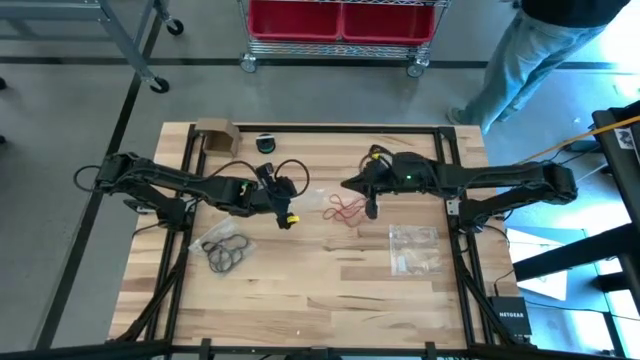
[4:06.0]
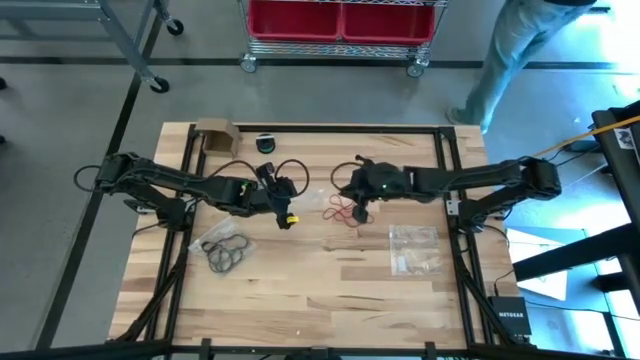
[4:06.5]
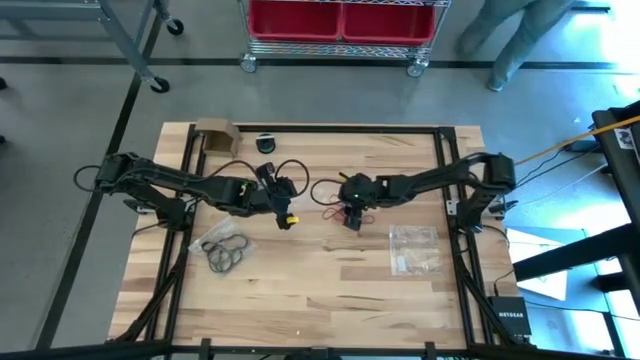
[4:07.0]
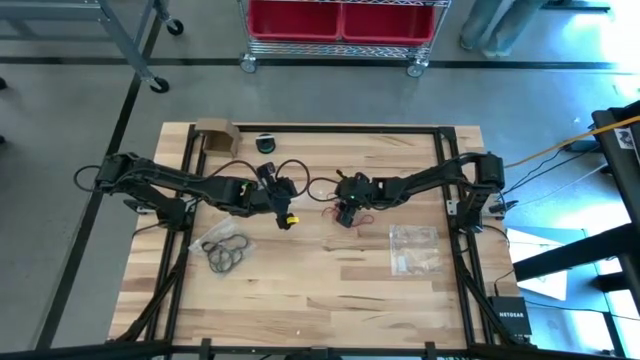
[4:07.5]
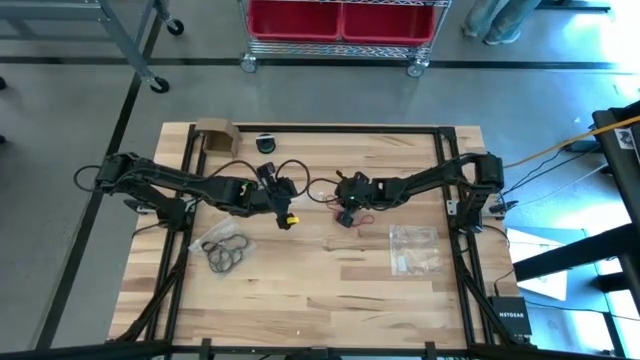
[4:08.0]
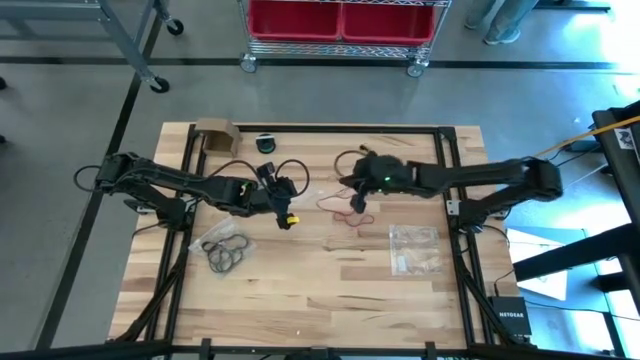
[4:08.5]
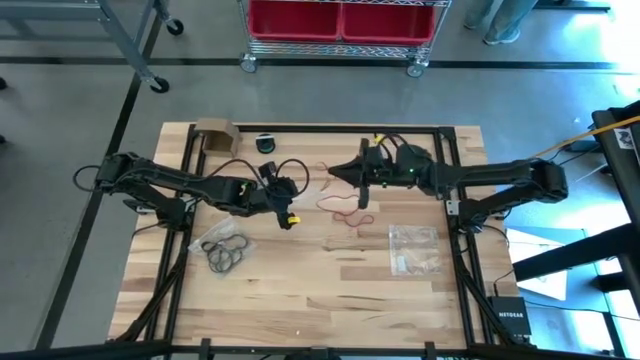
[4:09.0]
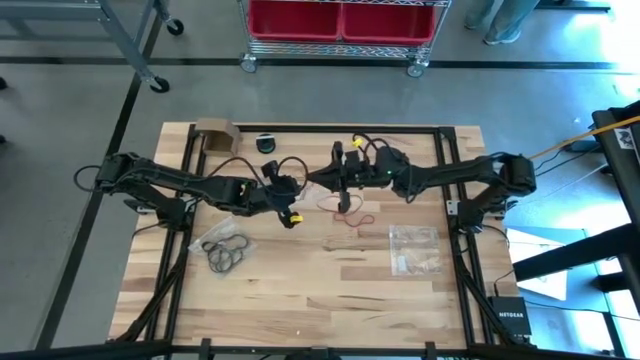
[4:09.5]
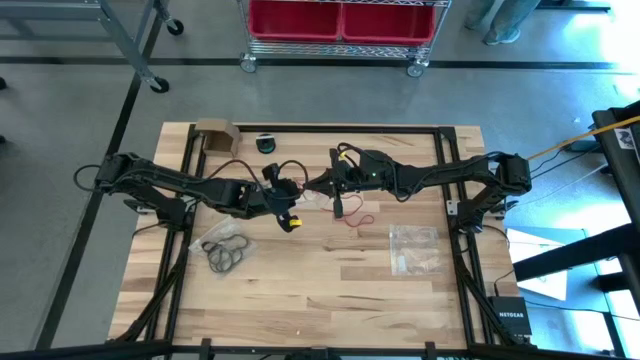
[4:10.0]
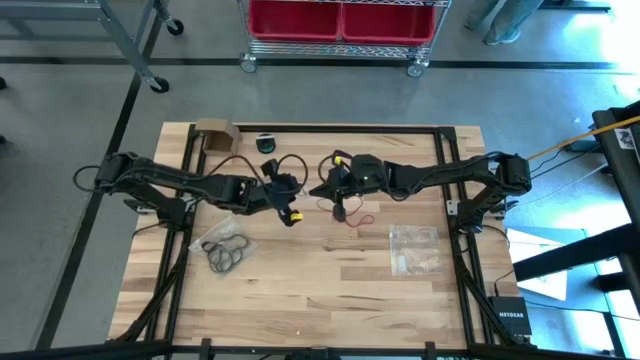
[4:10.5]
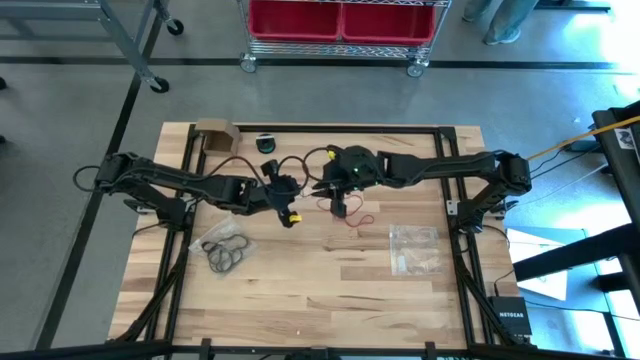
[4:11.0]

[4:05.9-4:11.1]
Task: Sort rubber bands
Put the red rubber band into the transparent zip bag

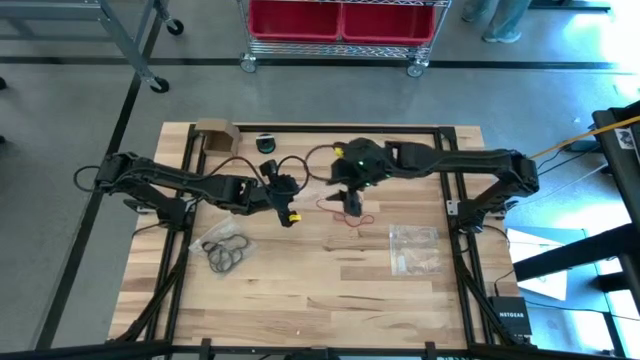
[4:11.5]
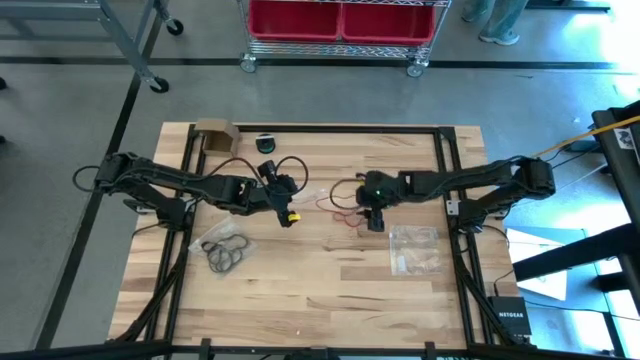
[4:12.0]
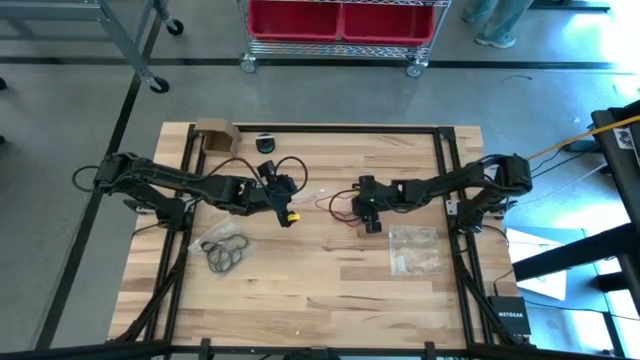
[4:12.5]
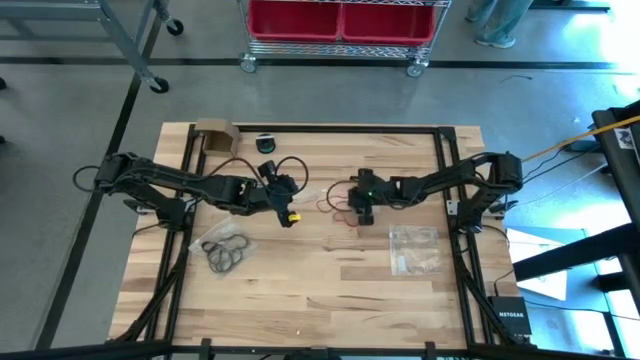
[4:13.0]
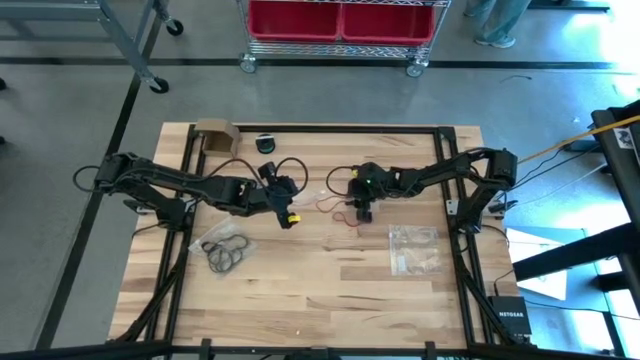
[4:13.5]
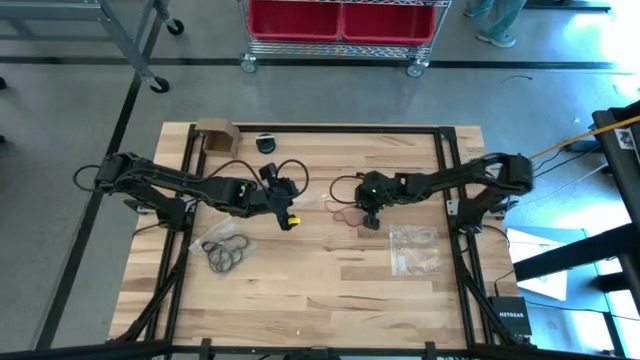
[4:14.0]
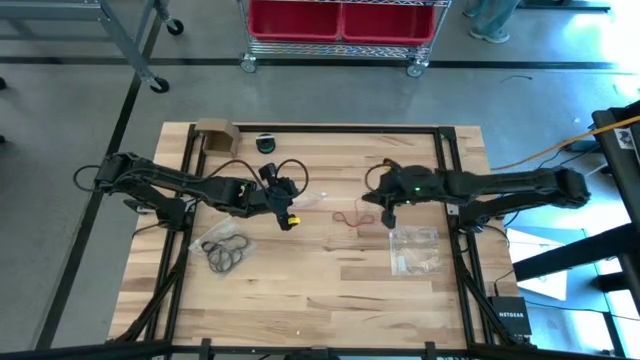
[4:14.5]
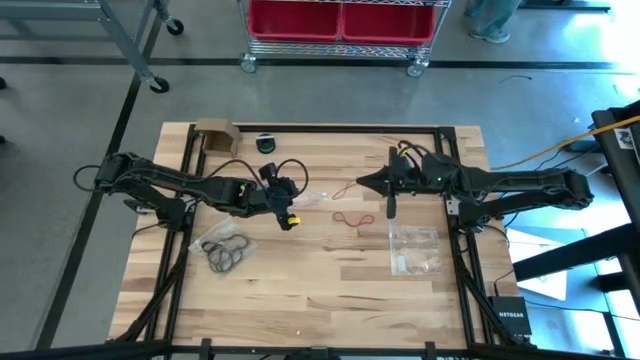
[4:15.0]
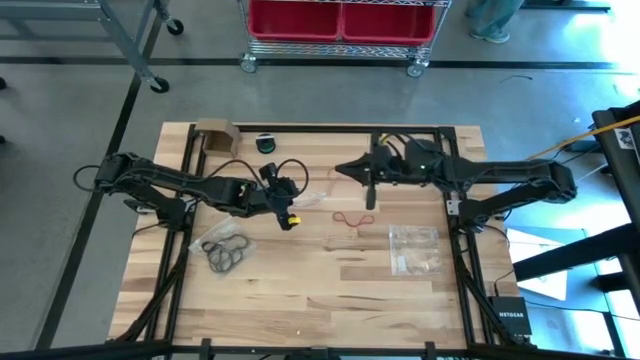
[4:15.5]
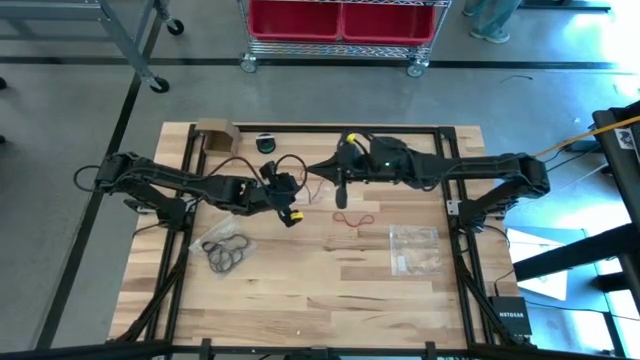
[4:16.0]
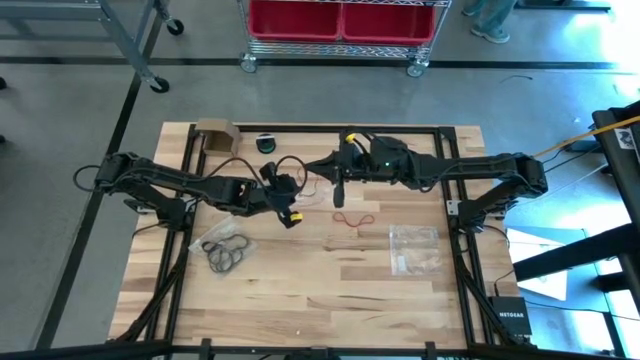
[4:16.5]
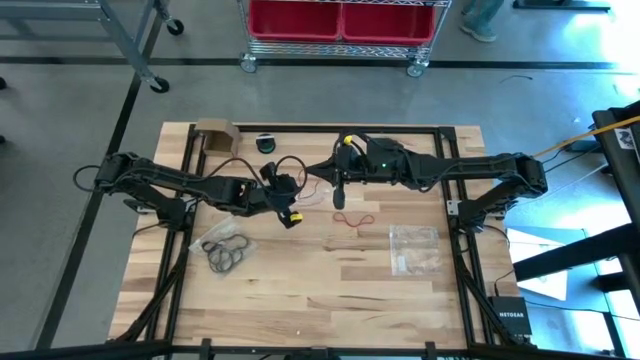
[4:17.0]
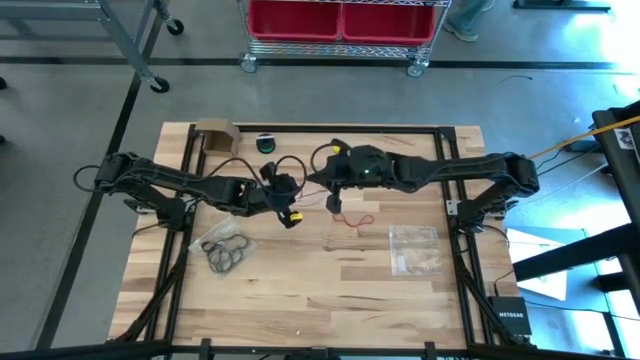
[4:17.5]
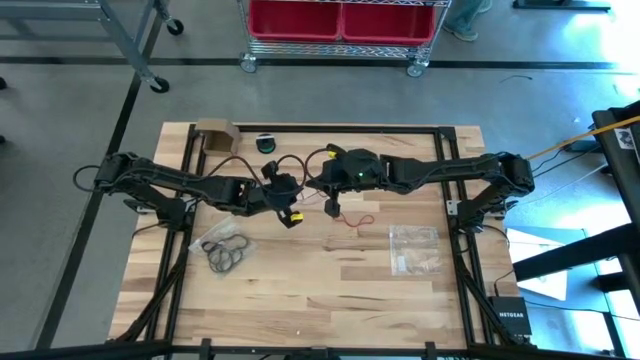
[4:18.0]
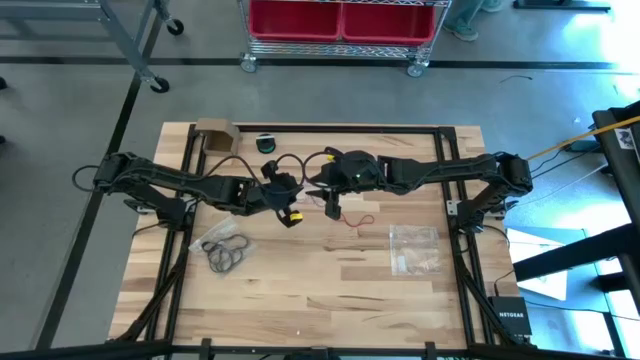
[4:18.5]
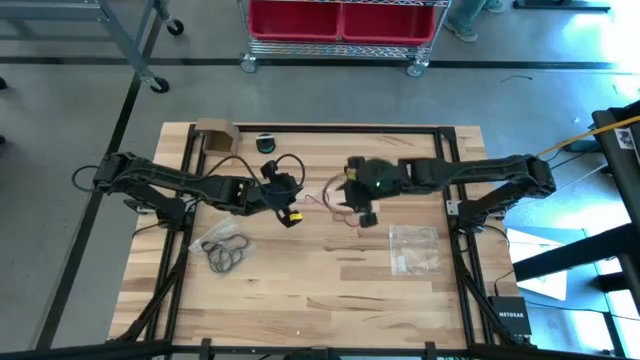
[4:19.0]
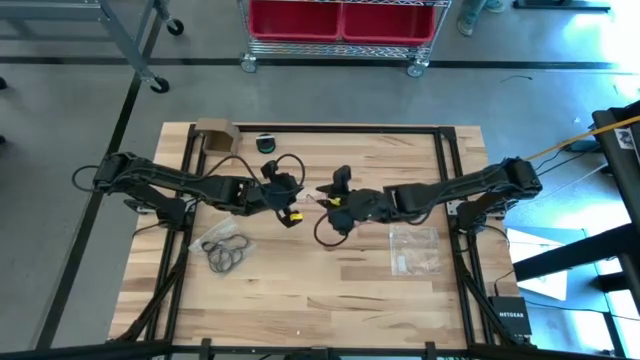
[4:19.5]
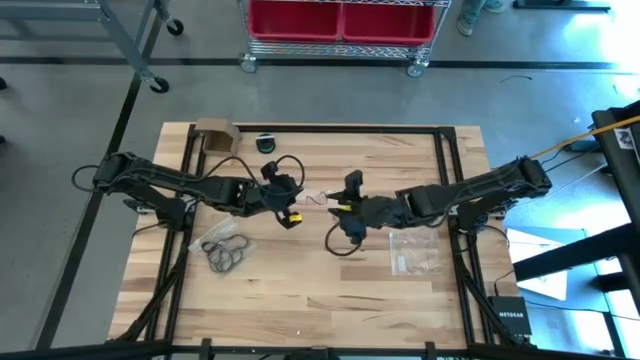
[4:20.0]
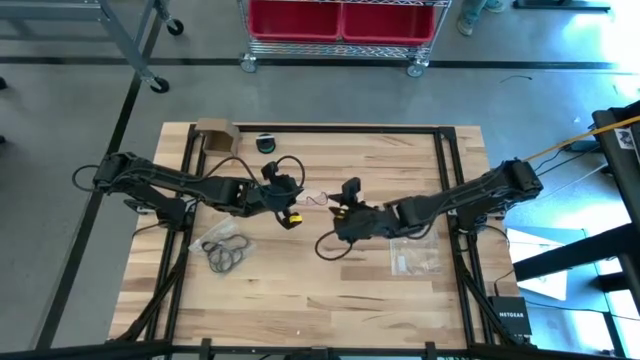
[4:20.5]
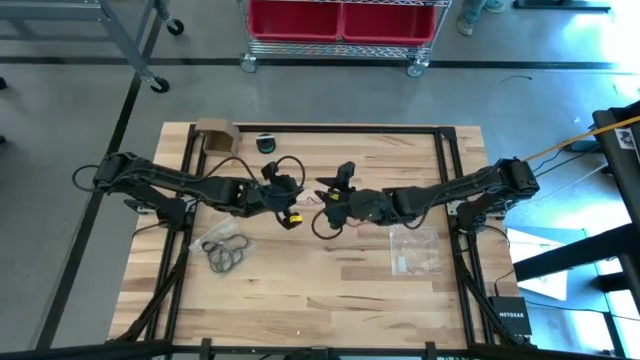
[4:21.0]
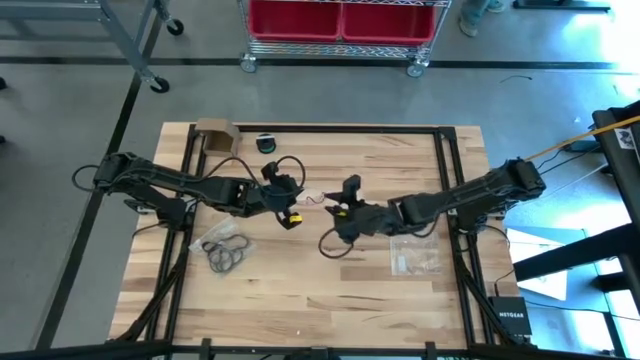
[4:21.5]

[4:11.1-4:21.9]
Put the red rubber band into the transparent zip bag

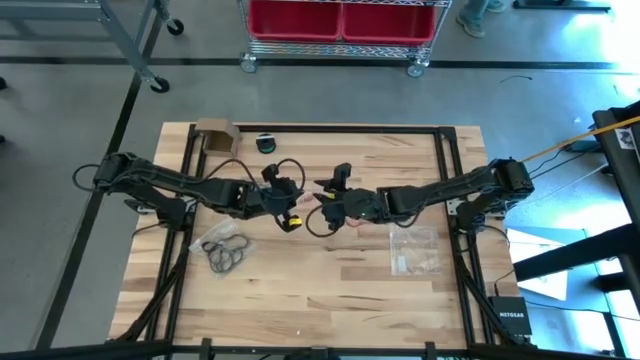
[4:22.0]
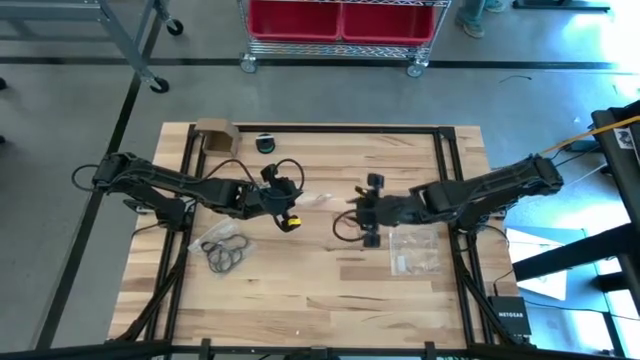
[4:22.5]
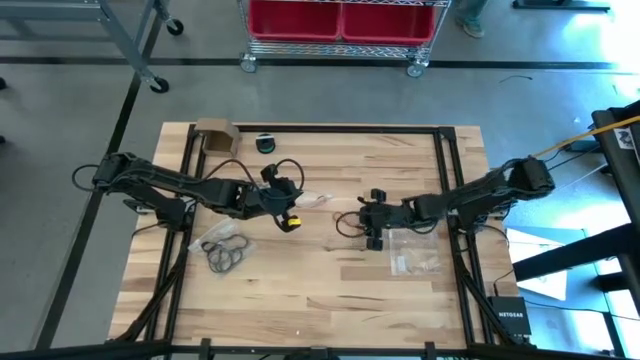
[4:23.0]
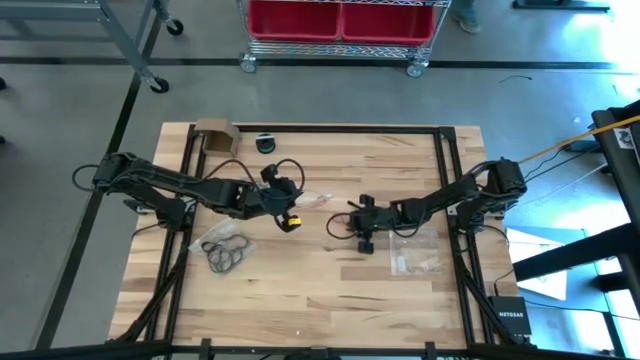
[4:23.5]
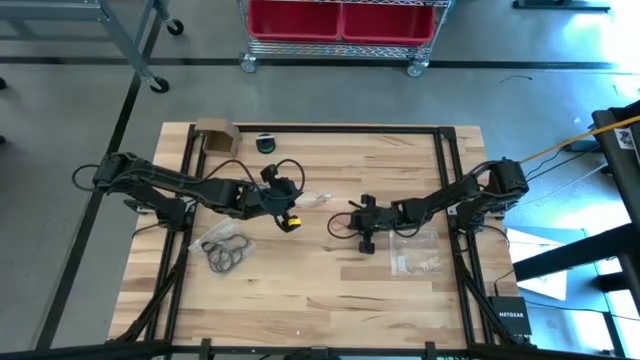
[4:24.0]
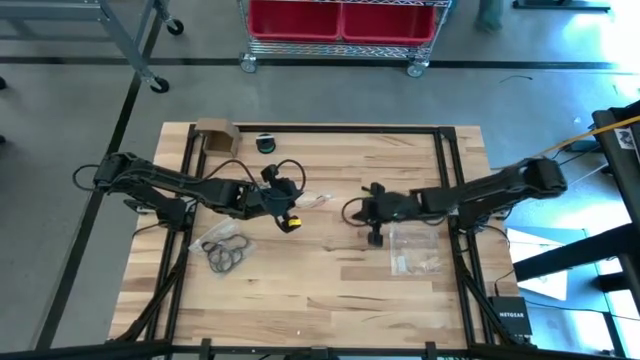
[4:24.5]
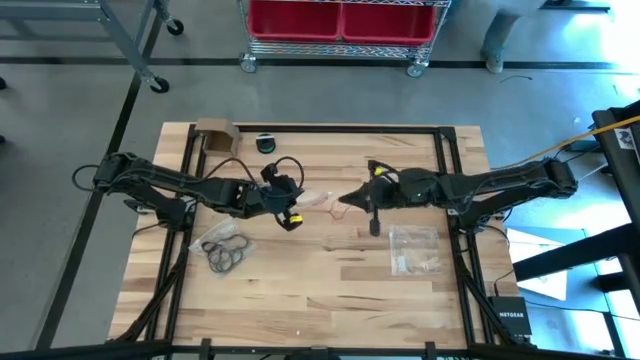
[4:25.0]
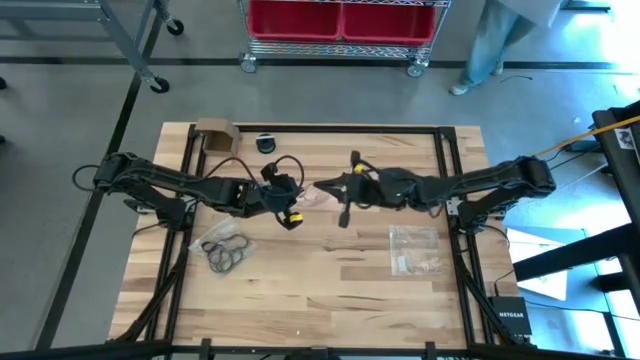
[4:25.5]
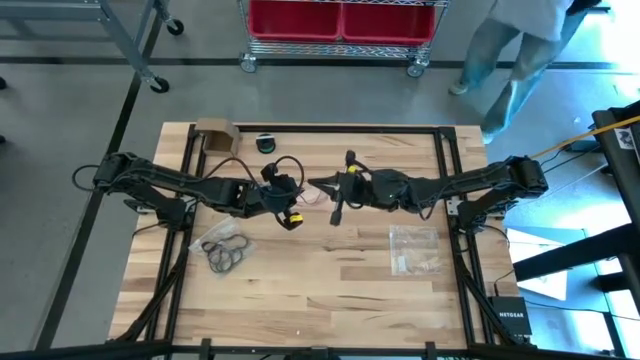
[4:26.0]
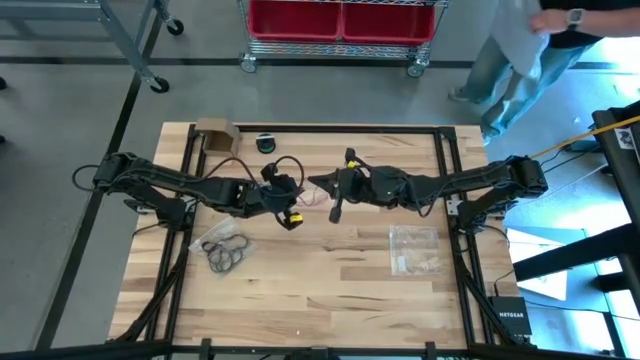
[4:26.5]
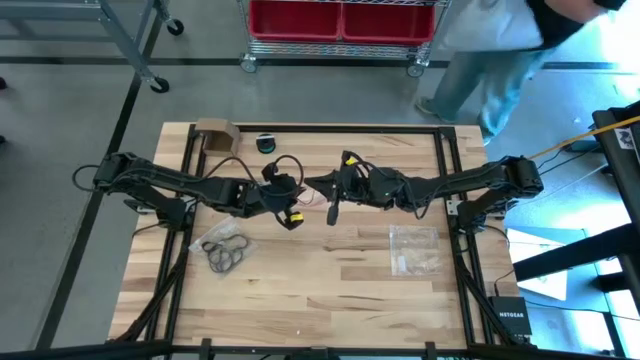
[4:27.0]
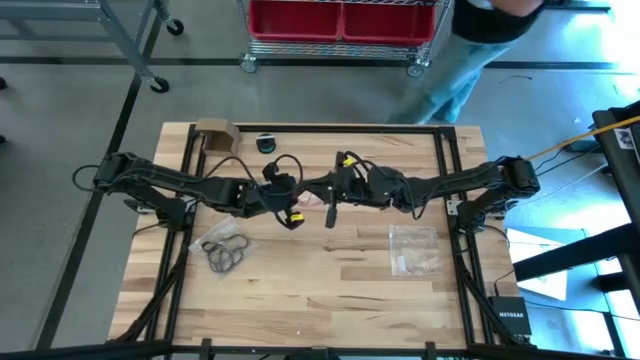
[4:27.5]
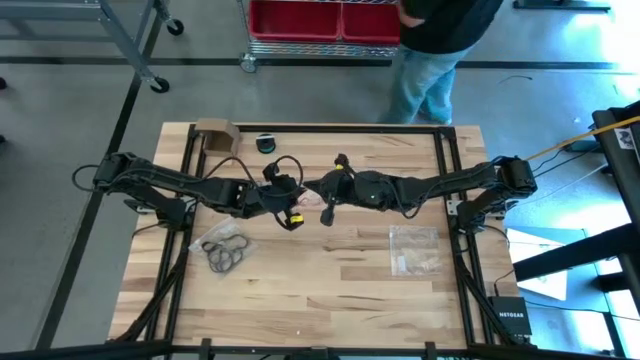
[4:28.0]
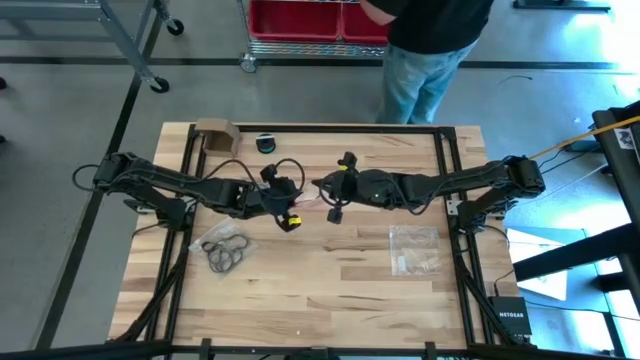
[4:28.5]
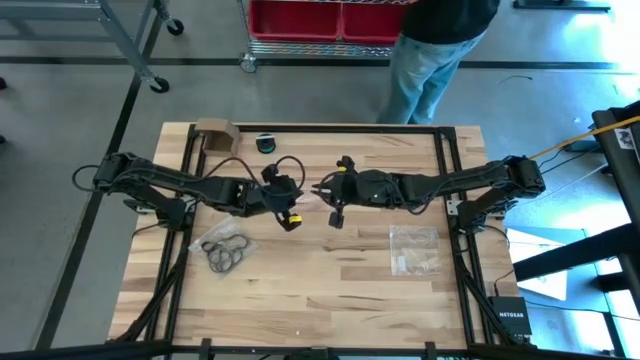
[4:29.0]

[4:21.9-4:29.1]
Put the red rubber band into the transparent zip bag
